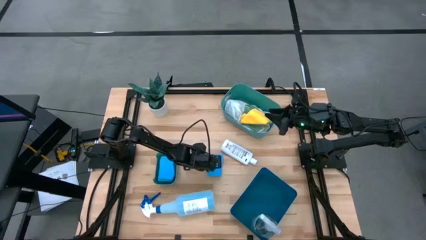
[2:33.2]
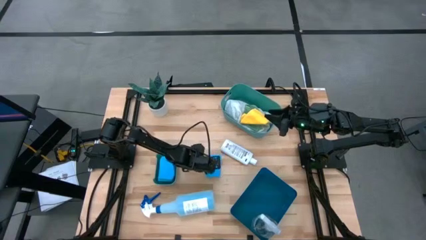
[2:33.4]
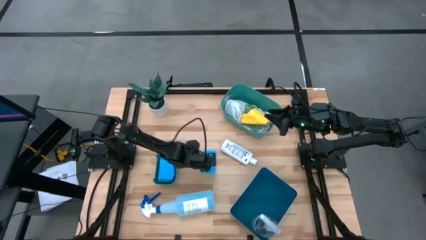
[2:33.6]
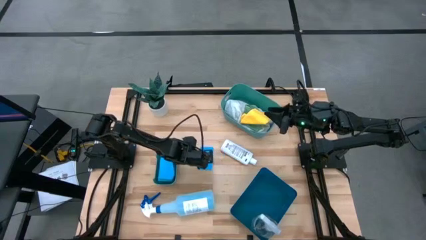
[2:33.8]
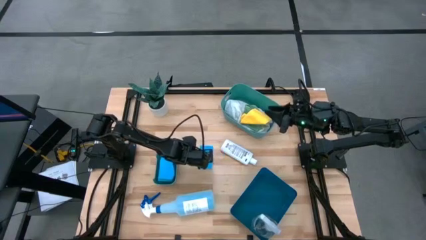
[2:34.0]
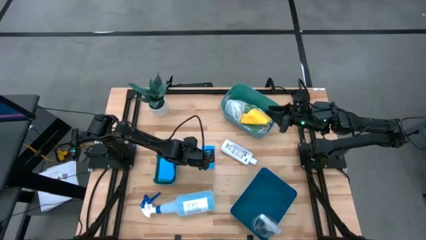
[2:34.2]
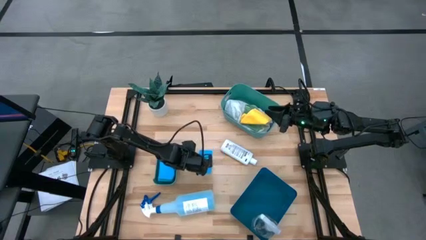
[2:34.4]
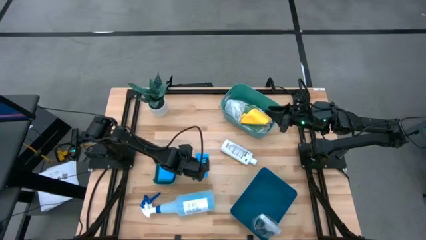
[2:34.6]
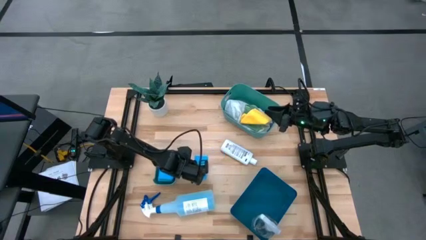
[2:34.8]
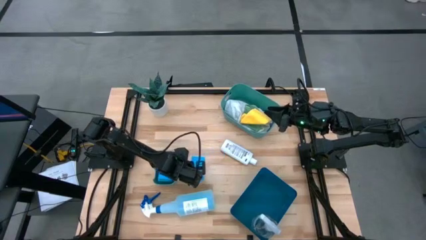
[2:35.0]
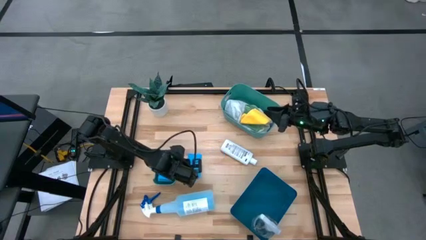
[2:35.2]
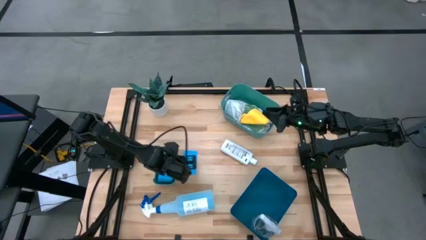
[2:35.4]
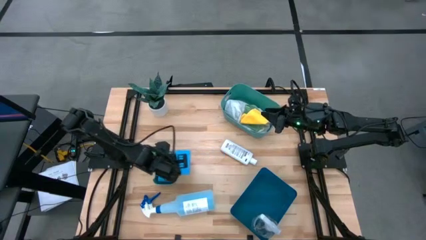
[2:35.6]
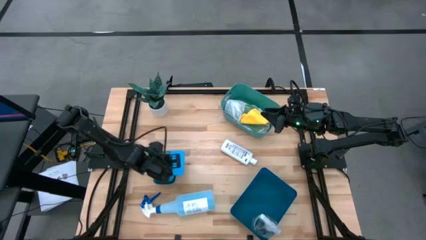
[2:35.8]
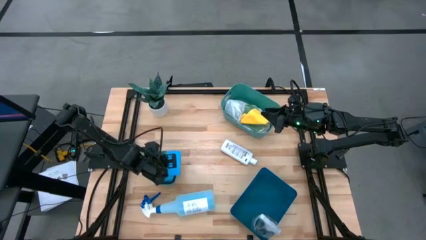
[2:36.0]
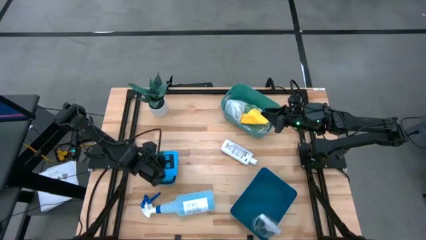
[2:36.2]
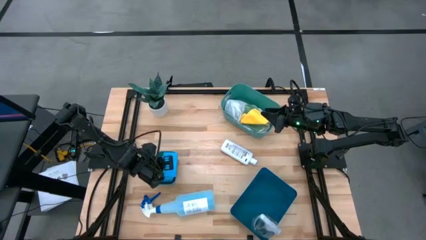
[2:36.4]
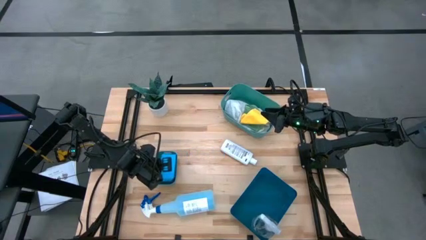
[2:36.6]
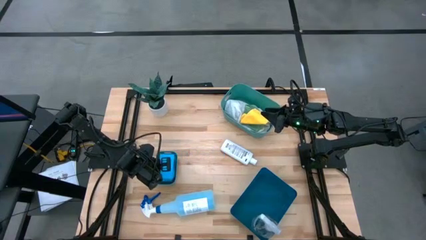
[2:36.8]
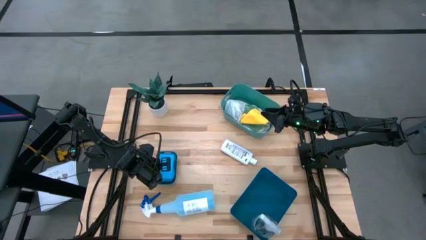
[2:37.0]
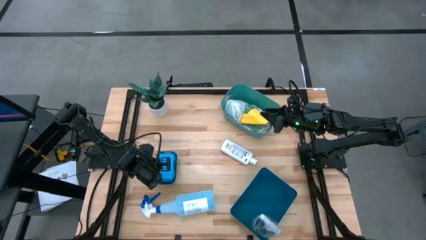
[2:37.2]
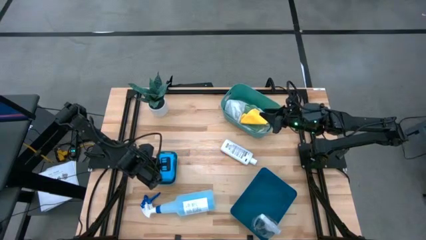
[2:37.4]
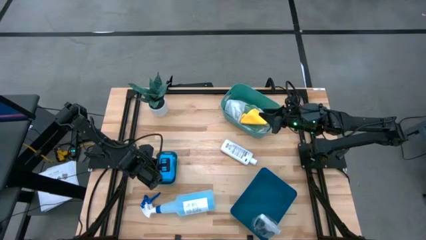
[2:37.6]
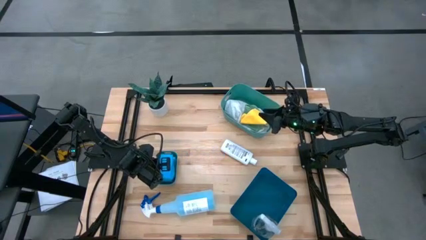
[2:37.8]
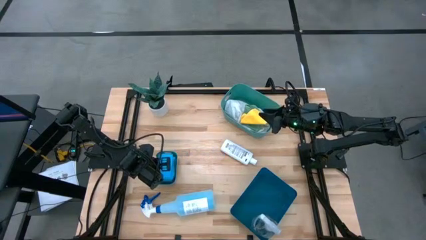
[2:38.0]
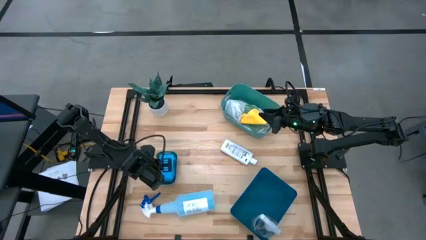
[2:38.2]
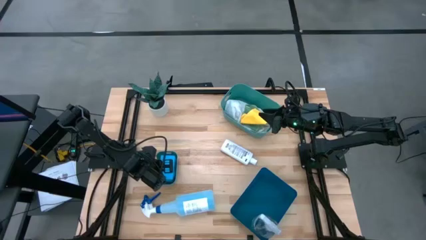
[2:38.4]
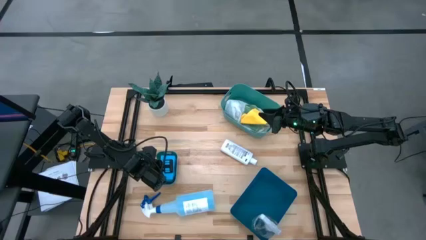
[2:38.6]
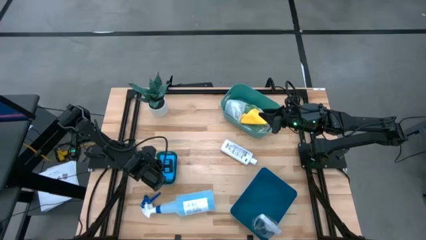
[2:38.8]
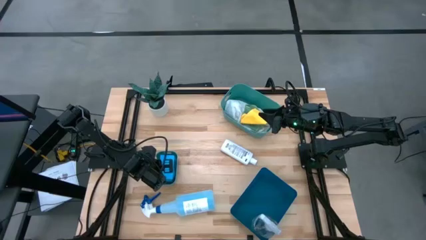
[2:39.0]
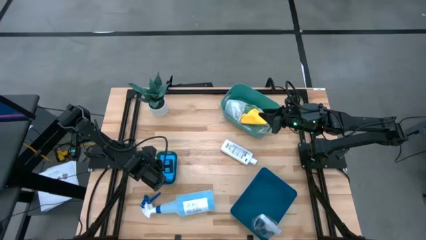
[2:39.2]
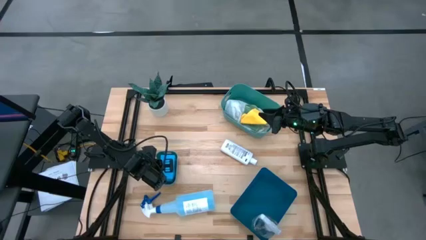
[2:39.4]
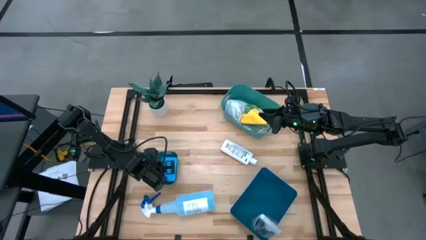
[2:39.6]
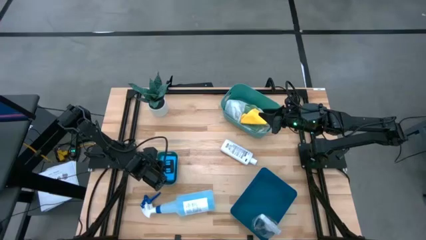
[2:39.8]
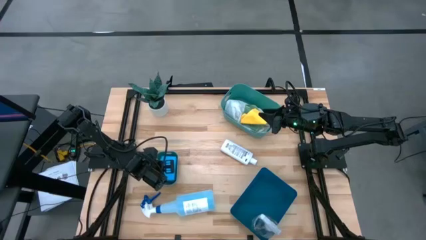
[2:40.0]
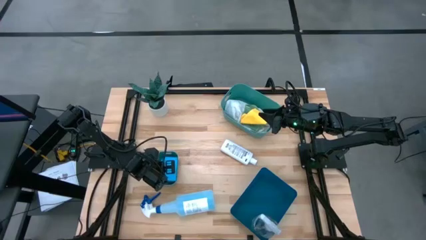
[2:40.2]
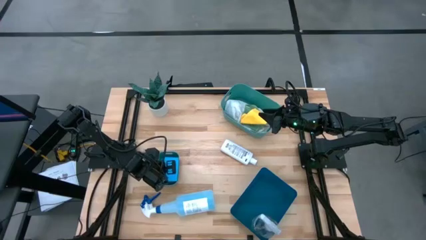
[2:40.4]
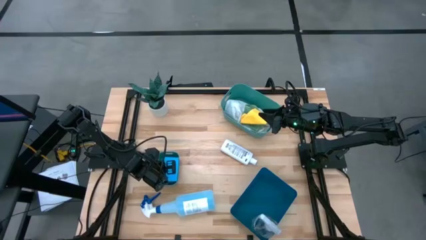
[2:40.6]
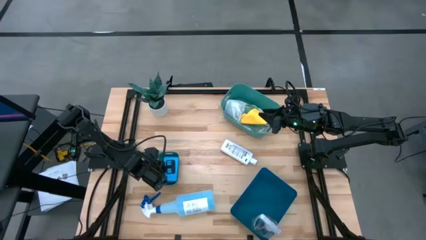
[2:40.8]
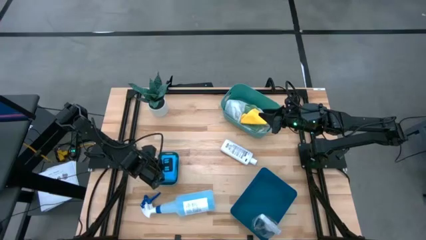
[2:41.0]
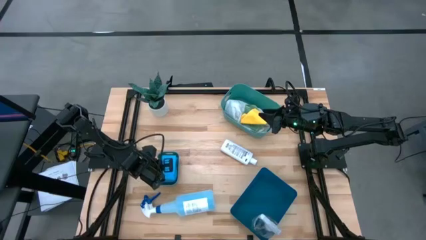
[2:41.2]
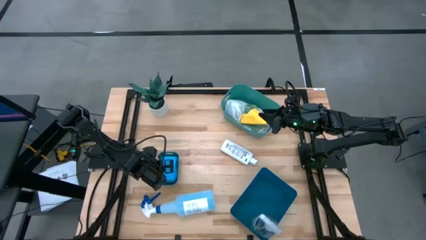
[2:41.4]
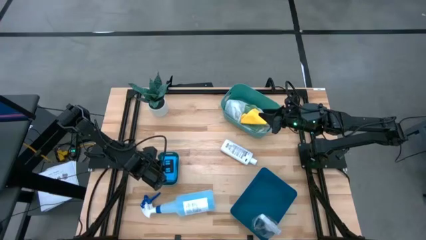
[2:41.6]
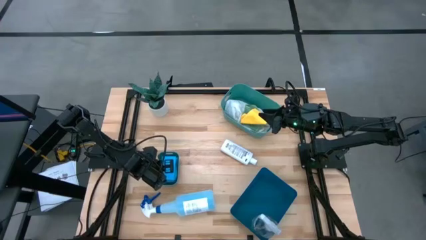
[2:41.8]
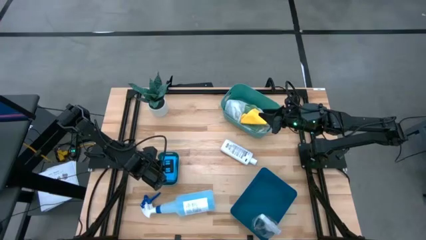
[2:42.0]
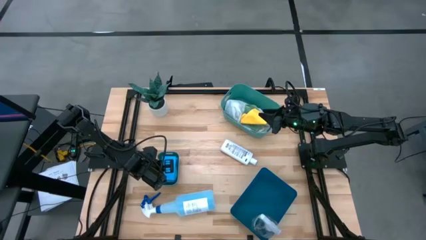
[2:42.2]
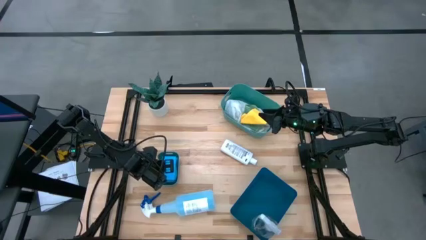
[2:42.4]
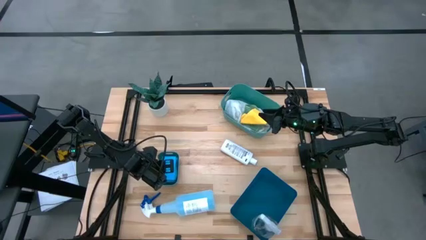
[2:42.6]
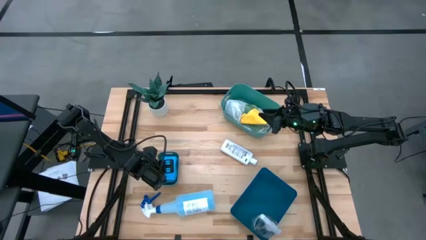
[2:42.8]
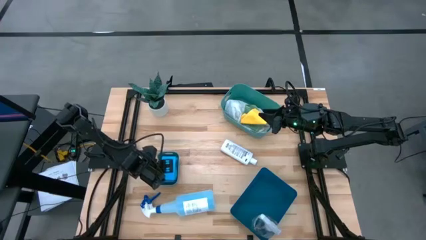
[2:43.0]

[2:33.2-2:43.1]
Task: Pick & Place Kitchen Items
Put the blue sponge into the small green bin
